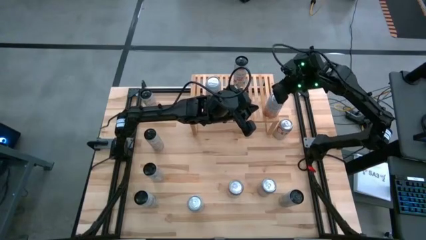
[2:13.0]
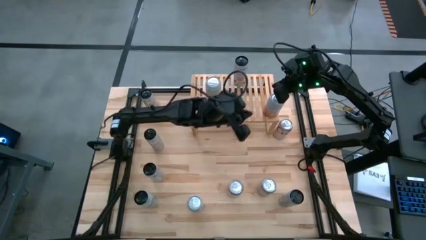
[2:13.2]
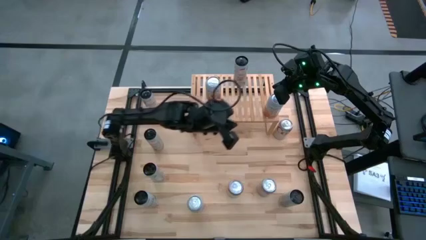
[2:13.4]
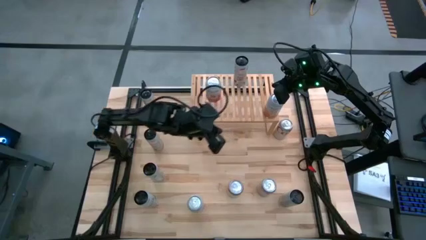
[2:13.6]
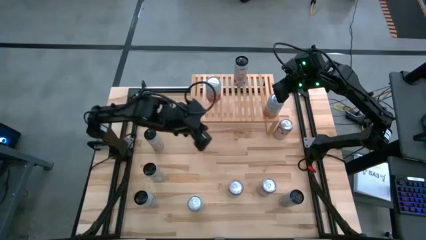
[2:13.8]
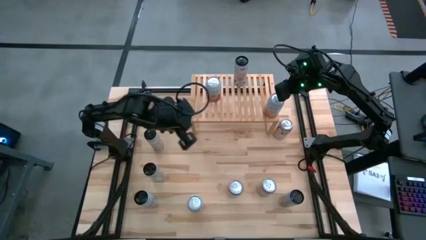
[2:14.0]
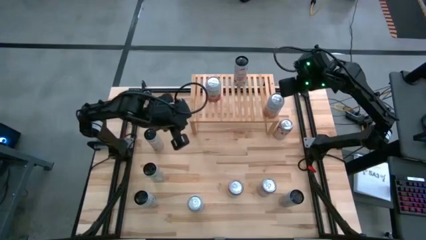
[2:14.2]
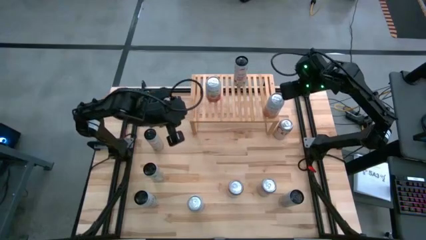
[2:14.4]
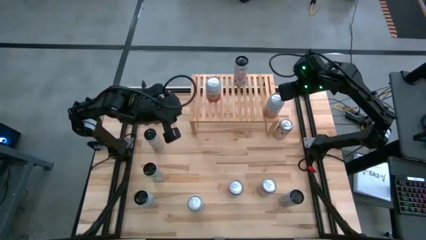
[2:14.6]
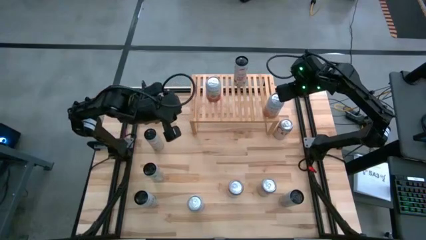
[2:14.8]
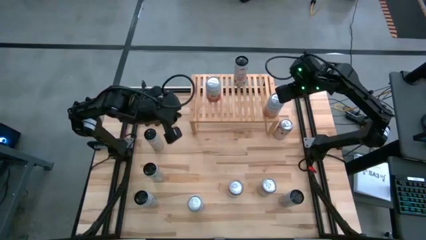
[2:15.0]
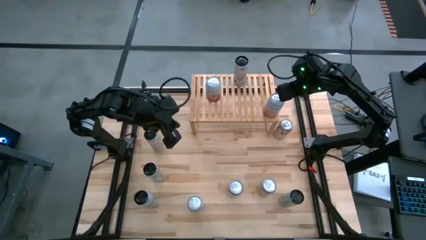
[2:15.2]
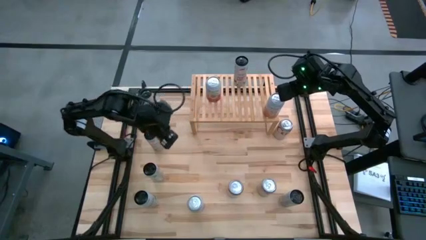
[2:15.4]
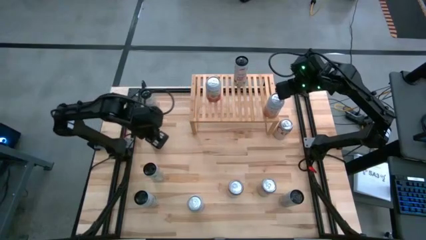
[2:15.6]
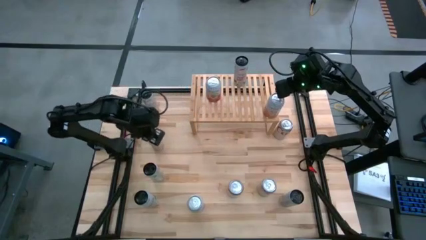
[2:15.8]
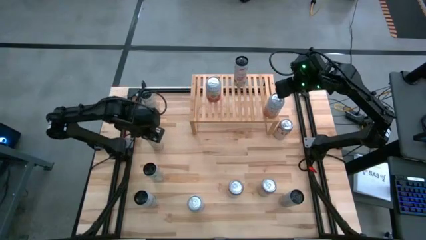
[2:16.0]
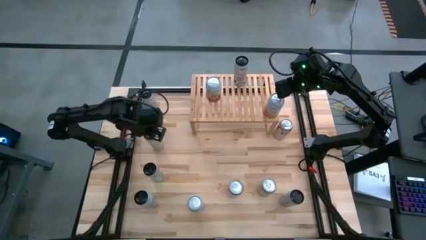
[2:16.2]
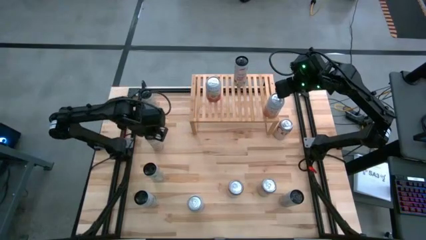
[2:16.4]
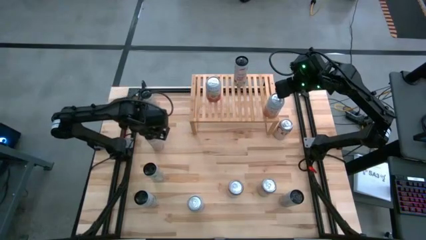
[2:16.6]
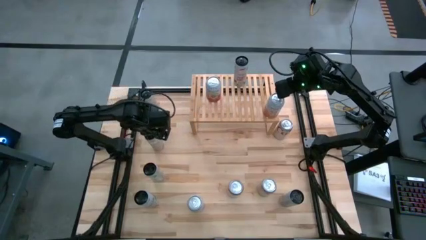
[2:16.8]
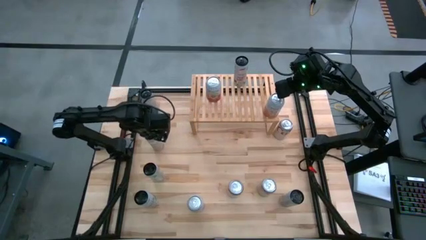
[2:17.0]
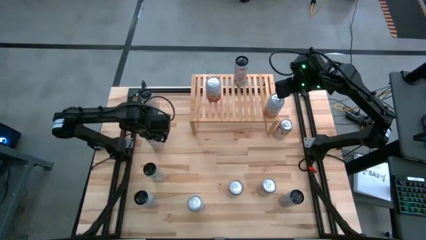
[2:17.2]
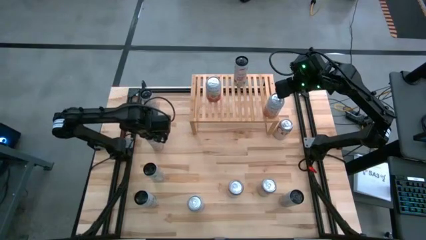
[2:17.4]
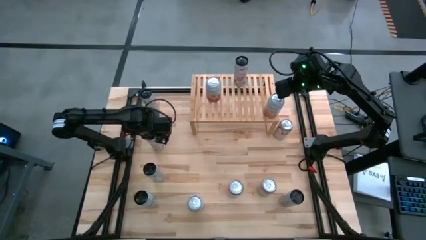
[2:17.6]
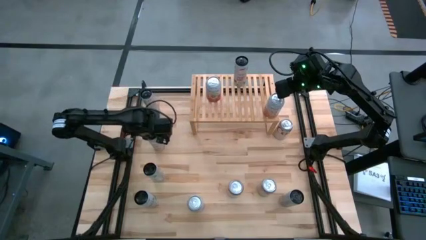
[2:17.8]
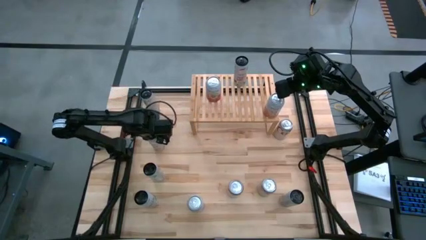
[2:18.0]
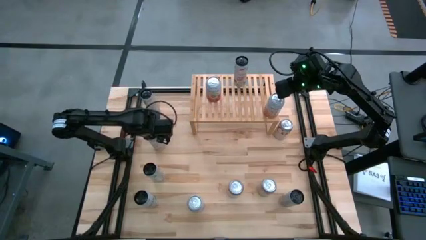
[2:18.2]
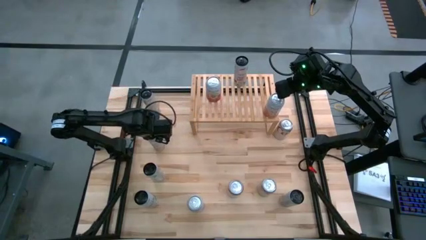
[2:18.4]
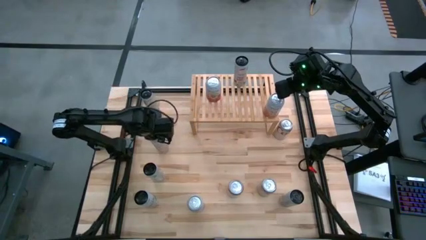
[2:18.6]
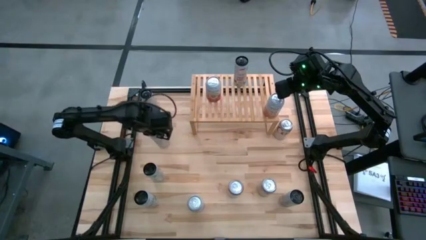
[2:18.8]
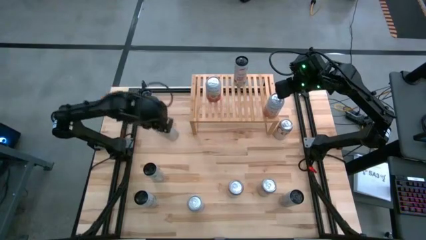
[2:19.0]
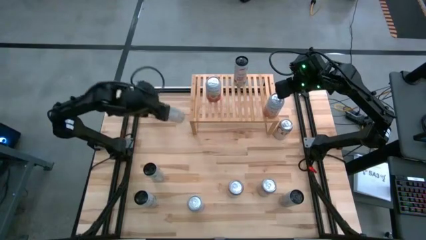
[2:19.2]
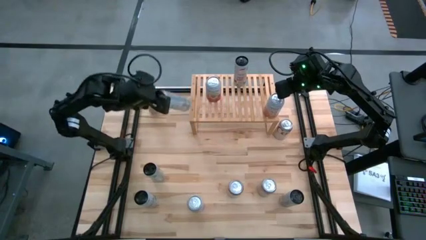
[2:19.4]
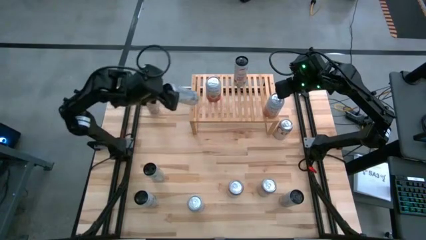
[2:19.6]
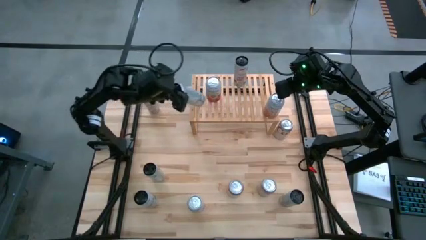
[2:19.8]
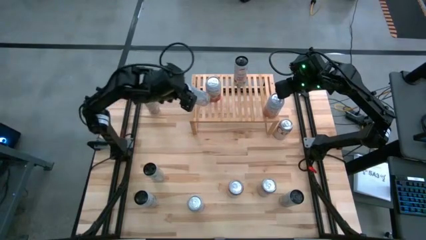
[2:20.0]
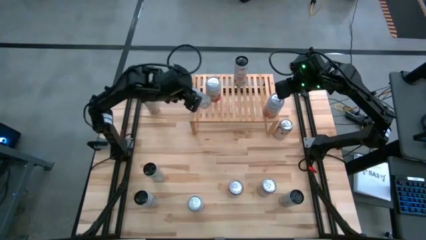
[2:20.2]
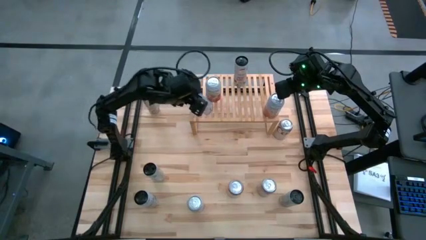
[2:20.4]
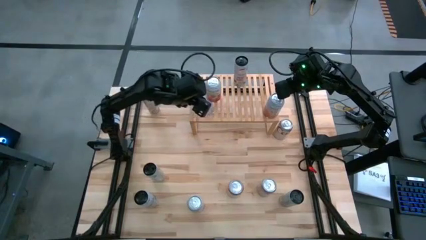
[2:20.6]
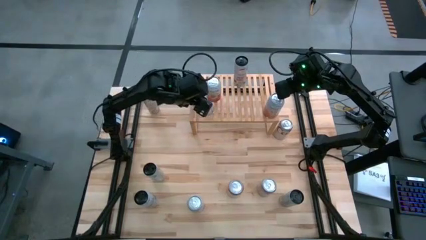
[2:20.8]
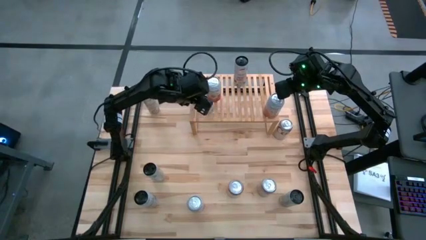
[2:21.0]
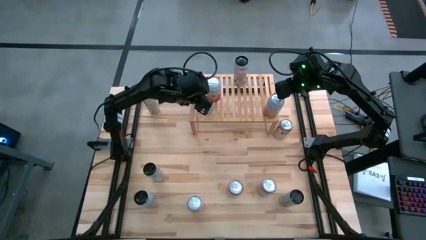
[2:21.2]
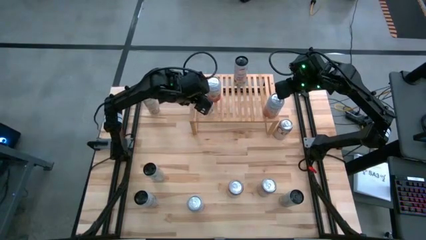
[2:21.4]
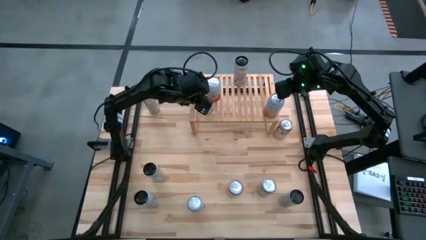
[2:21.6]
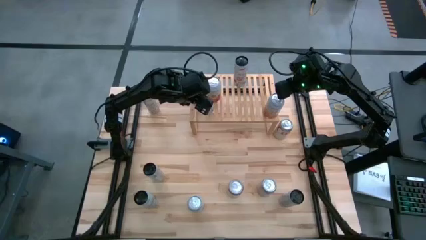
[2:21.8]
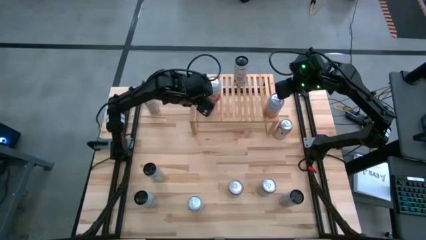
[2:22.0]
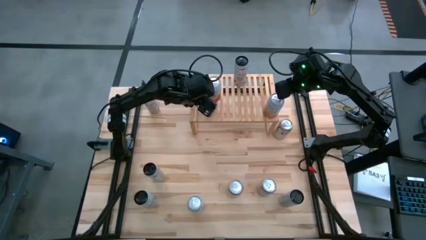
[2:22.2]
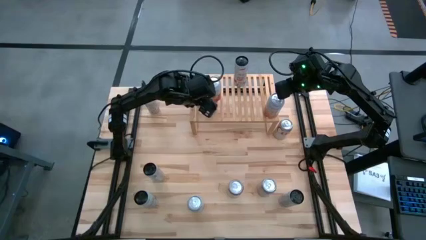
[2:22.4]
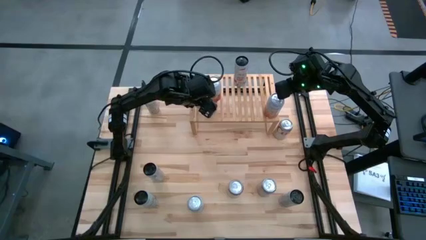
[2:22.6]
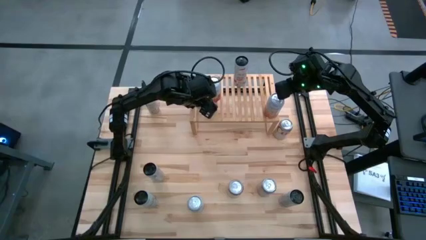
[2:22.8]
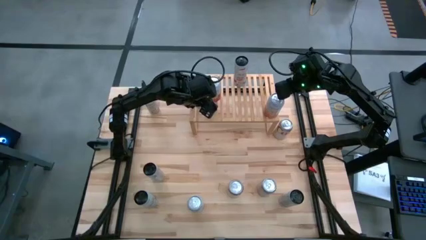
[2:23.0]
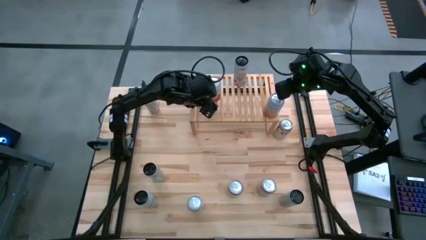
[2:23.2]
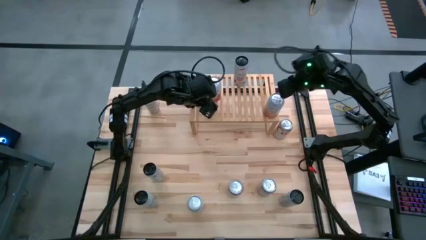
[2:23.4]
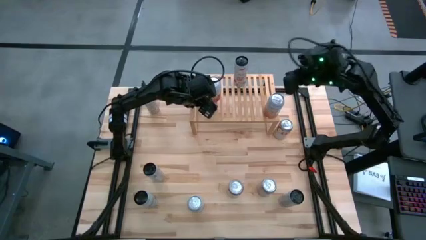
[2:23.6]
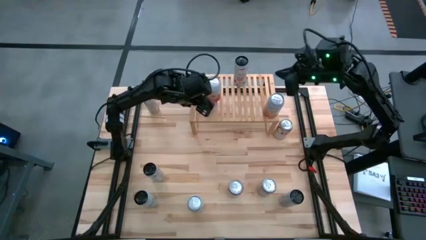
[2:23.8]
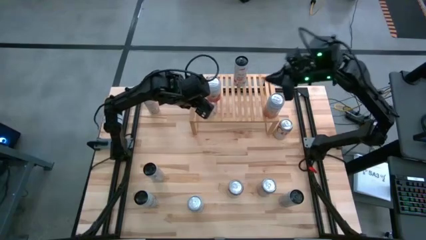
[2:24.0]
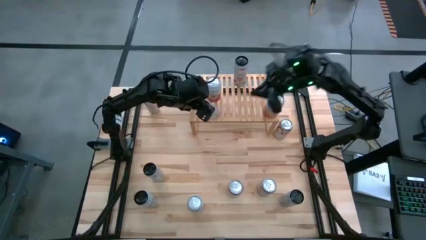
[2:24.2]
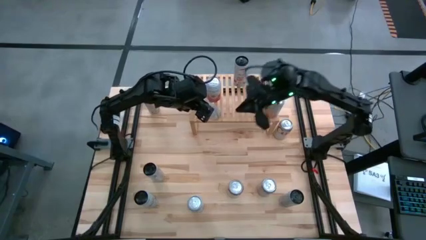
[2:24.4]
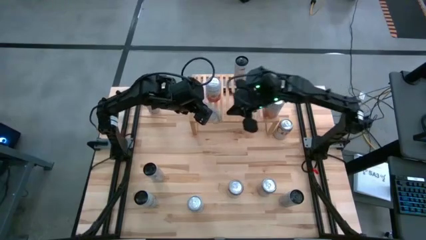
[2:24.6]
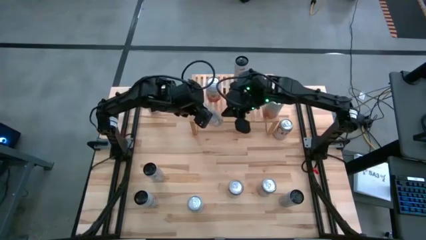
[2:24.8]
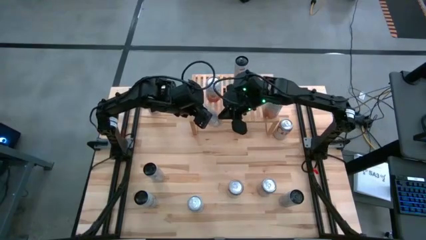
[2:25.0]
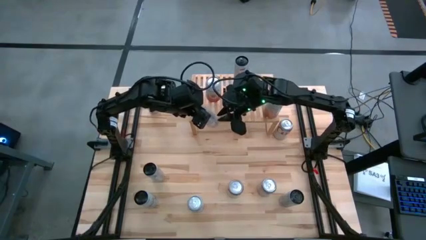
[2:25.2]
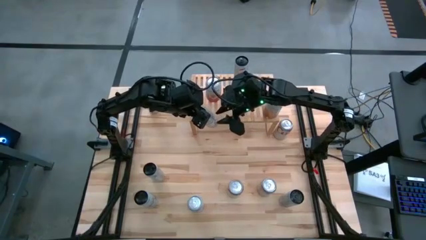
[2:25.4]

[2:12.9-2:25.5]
Task: Place canned beverage on shelf
Put the bottom white and yellow soda can on the shelf

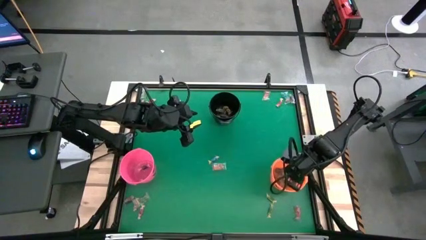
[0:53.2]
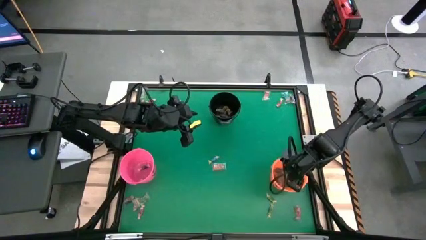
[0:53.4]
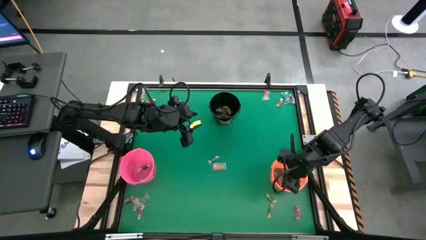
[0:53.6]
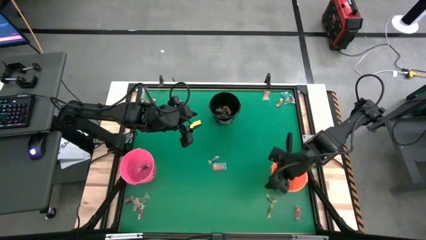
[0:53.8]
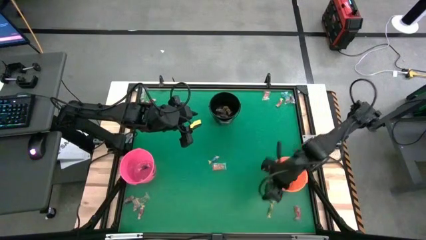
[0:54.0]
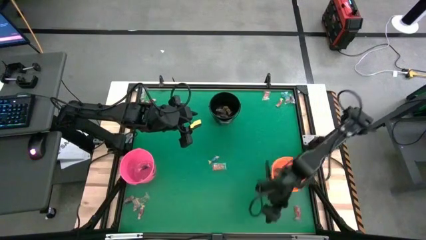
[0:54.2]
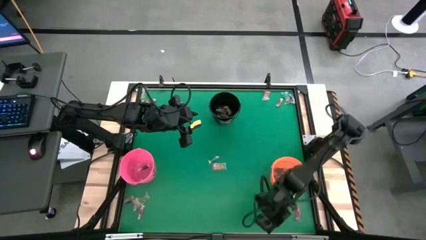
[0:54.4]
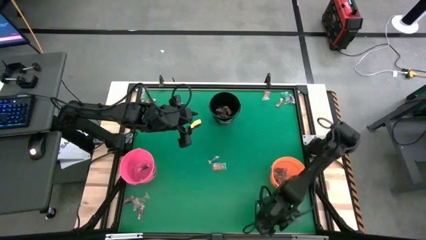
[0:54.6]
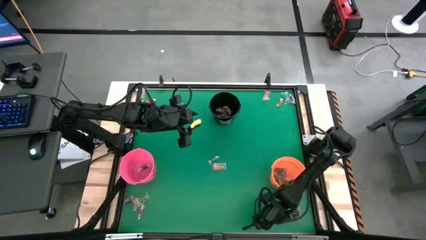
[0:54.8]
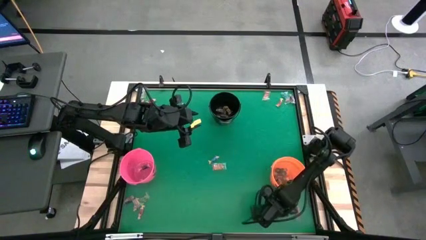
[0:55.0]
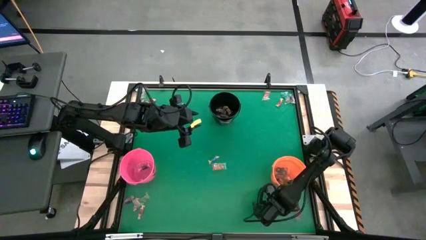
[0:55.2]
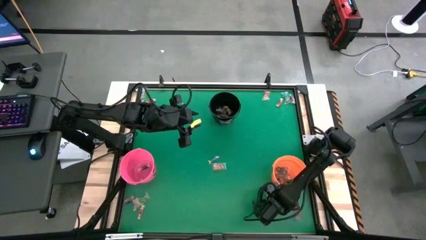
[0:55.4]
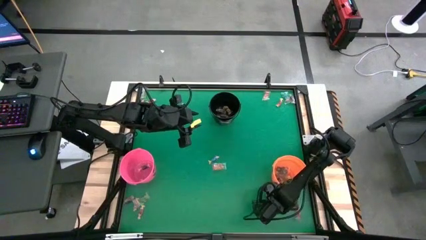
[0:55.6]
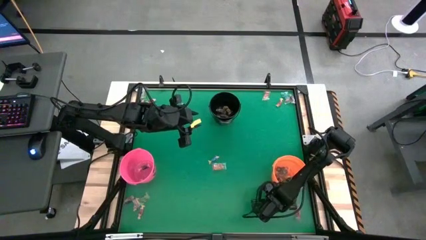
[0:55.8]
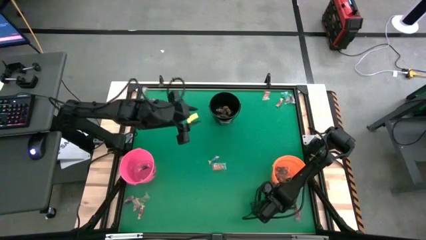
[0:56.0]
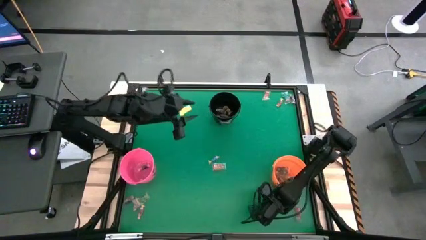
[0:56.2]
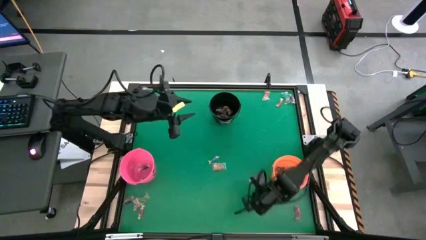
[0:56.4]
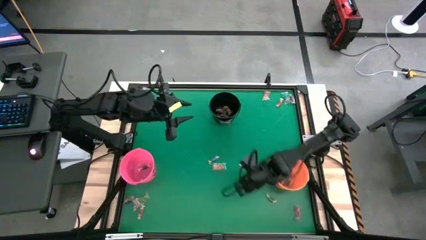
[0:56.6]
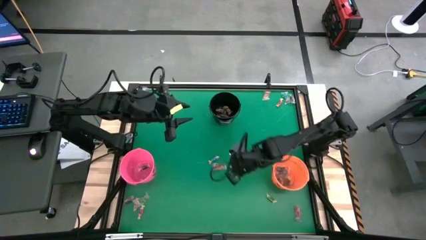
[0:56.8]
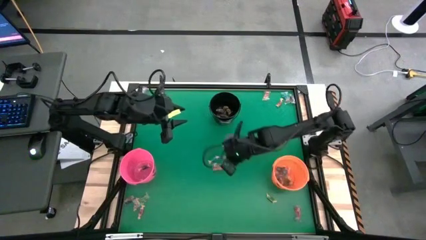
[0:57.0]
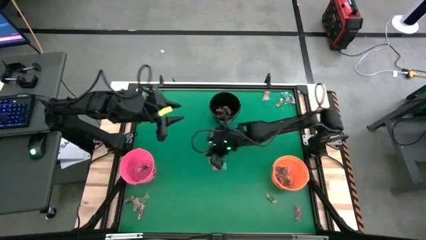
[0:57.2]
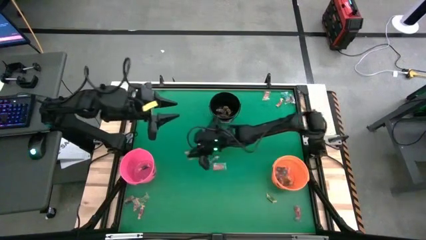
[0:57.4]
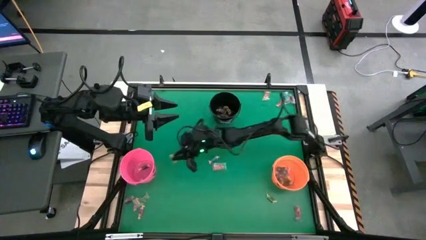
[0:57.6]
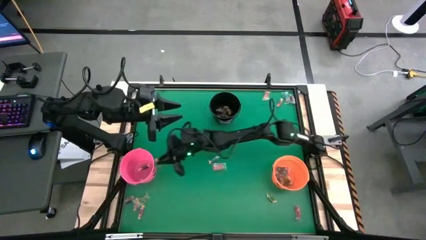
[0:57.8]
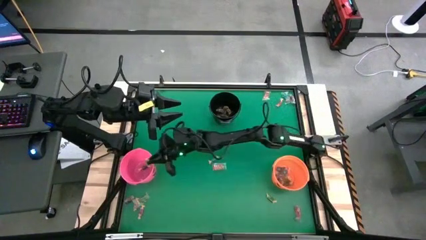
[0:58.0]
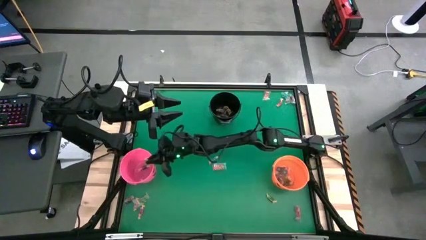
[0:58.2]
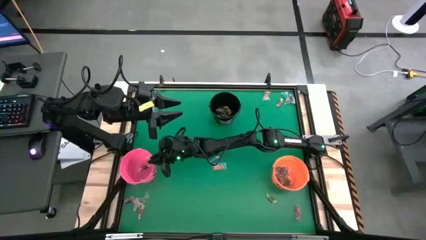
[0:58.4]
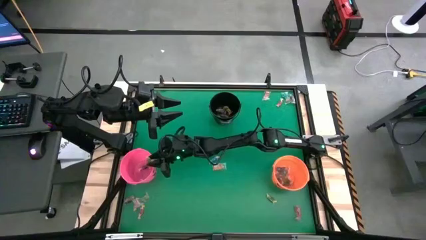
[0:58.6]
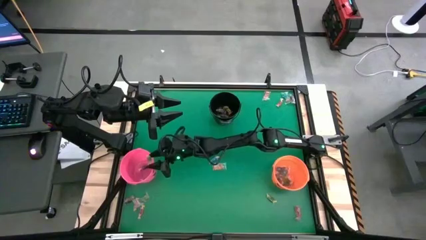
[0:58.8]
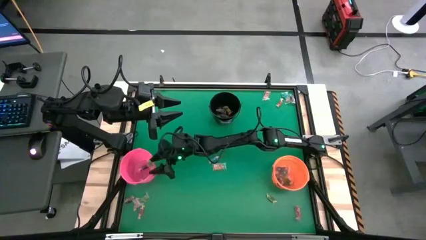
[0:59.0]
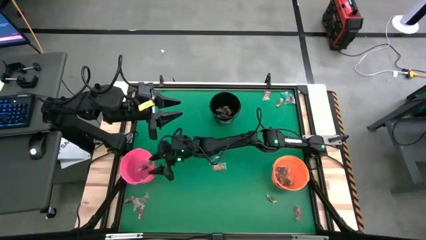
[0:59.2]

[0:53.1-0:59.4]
Task: Sort candy by brand, put in halloween buckets
Put the green candy into the pink bucket
